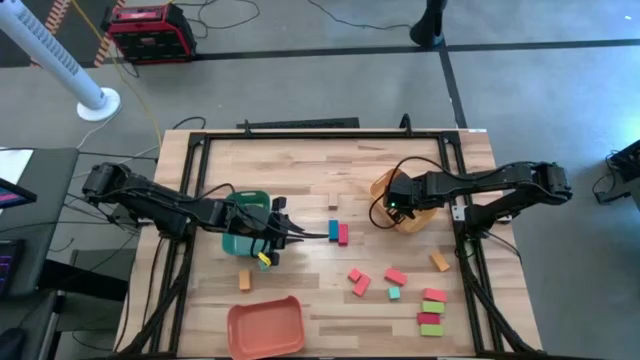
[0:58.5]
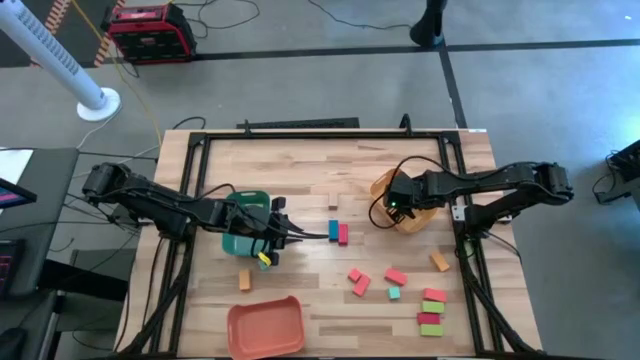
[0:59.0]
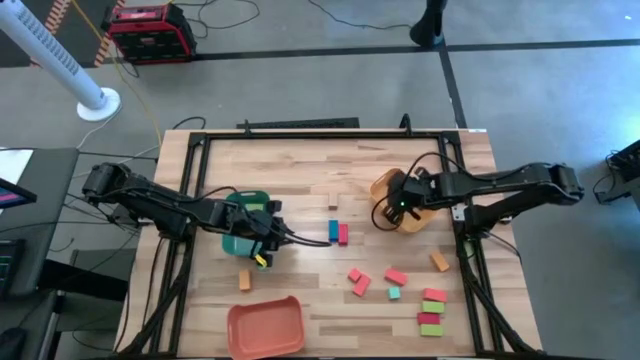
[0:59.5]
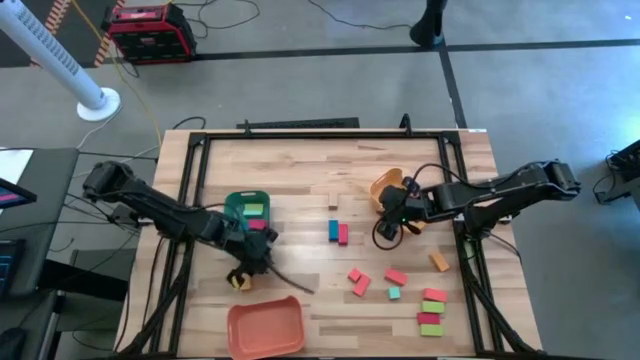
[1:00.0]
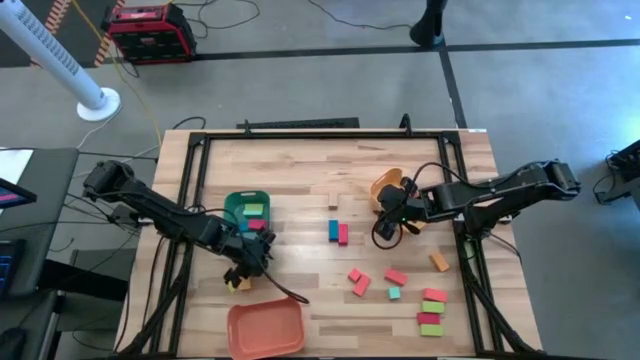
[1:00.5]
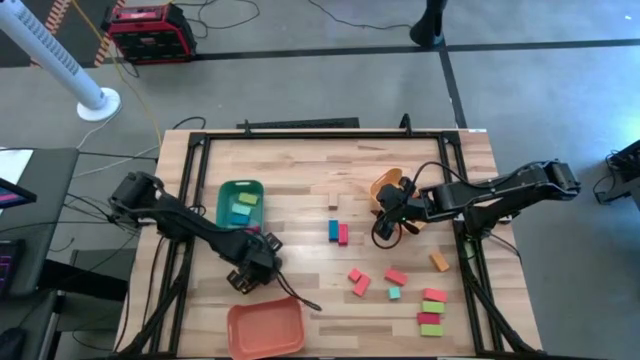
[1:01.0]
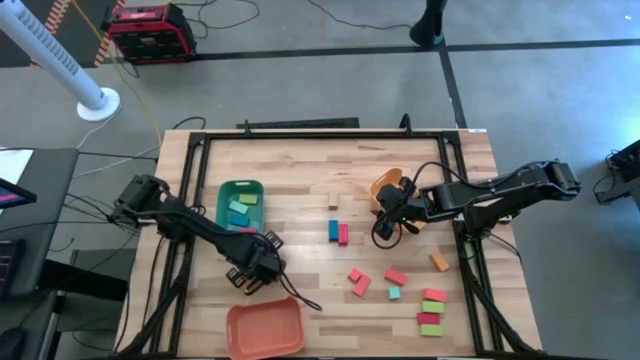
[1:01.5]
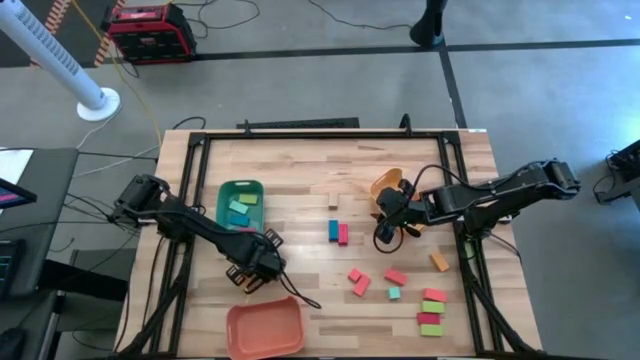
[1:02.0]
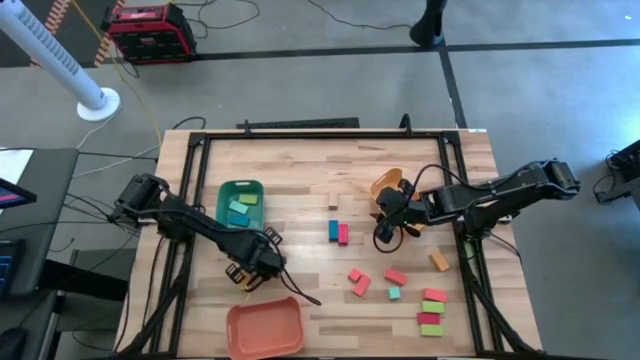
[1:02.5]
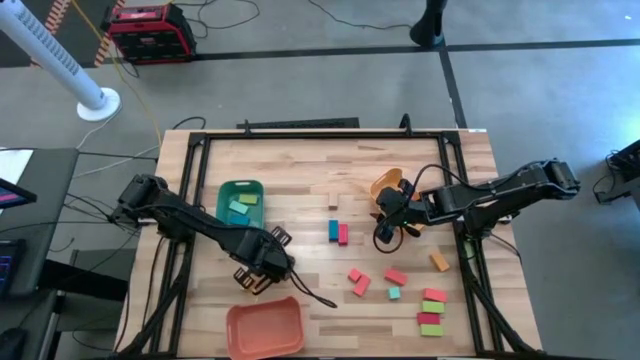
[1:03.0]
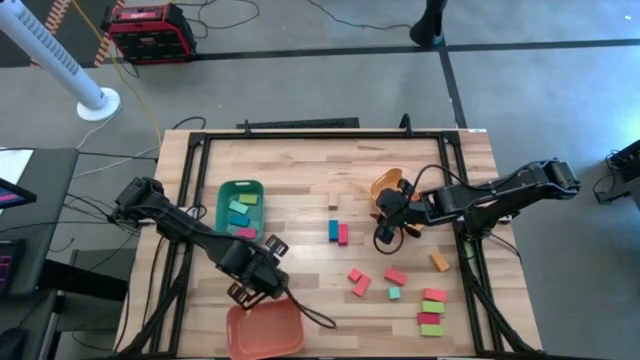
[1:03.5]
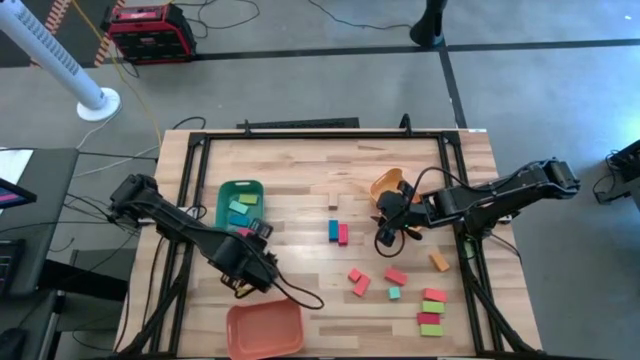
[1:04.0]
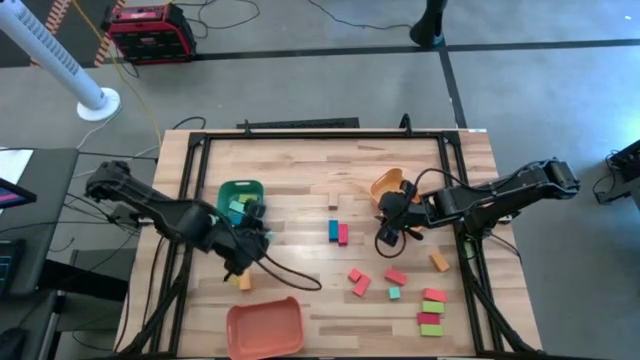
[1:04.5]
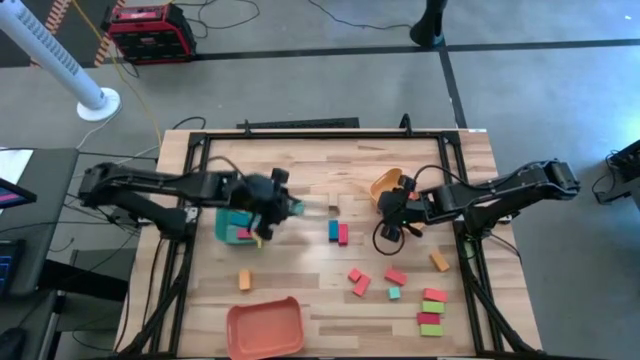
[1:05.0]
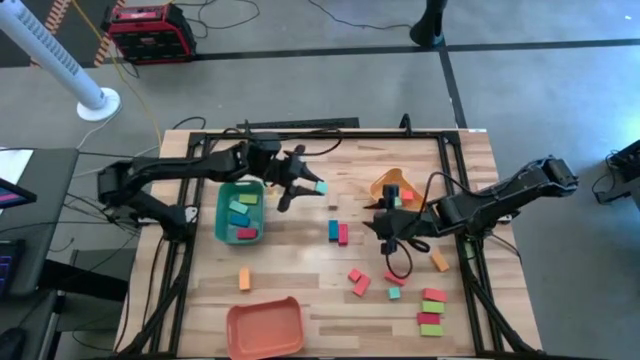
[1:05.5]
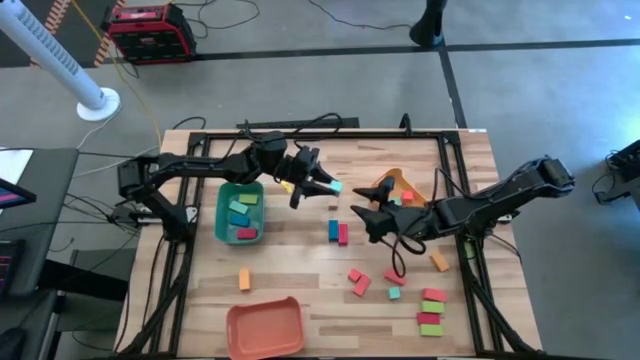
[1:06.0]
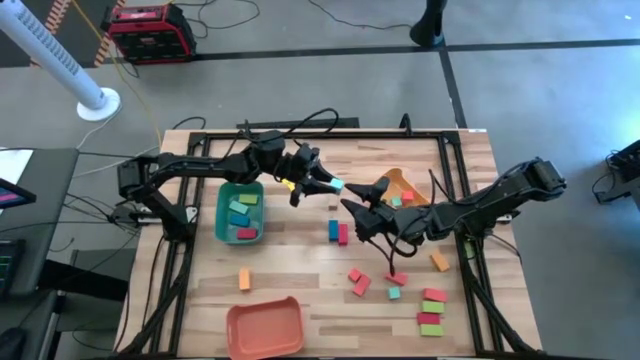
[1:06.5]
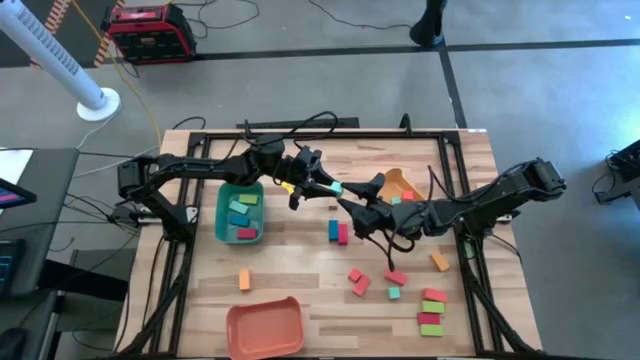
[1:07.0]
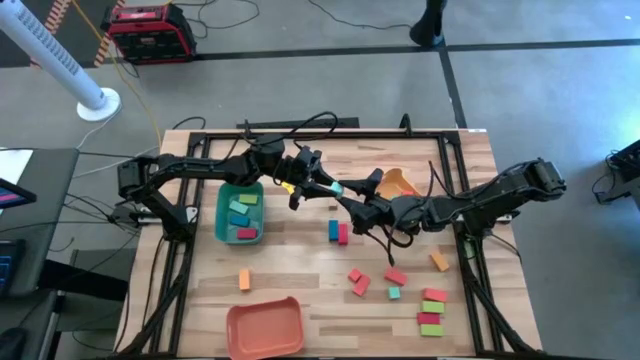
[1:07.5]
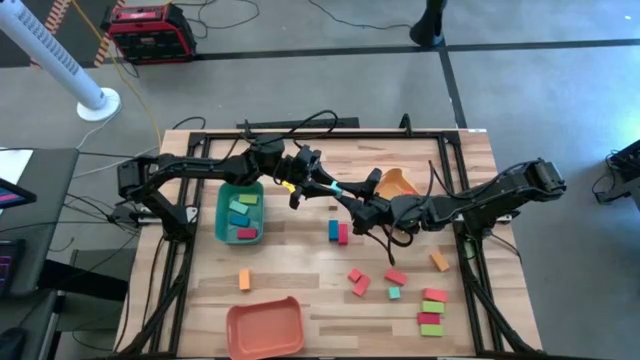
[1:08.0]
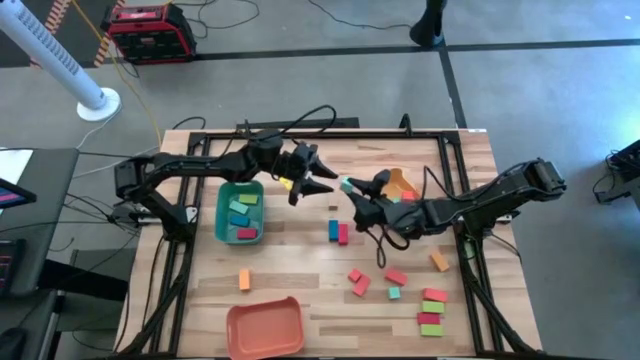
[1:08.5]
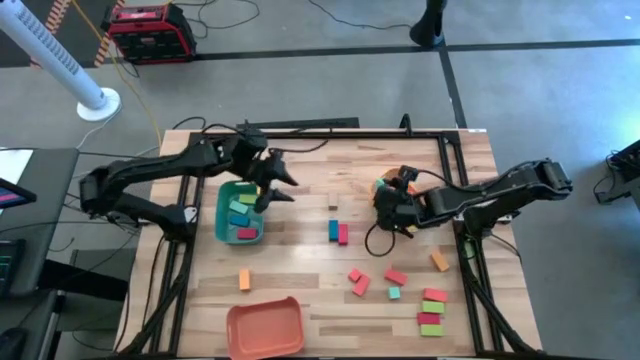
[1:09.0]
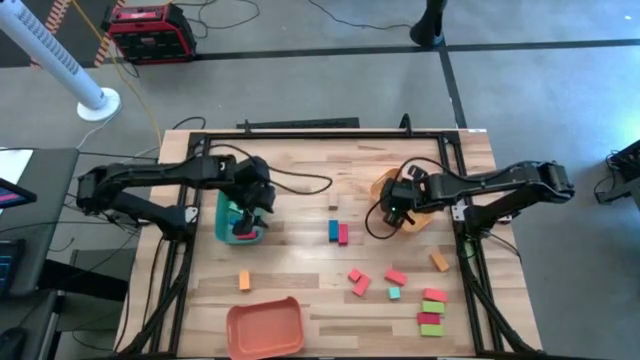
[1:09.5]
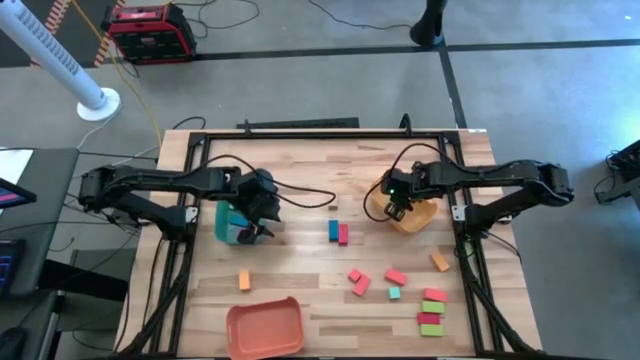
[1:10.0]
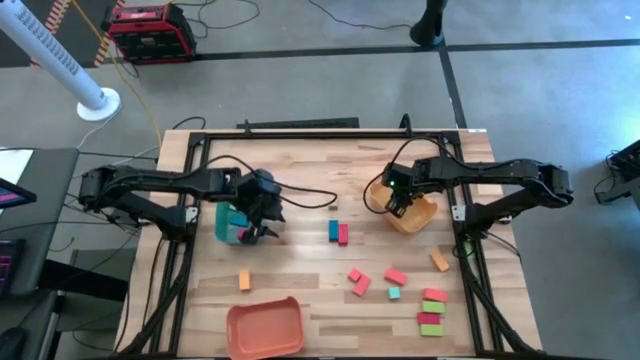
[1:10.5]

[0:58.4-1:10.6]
Task: Sort blocks by size
Put the top light blue cube block into the yellow bin

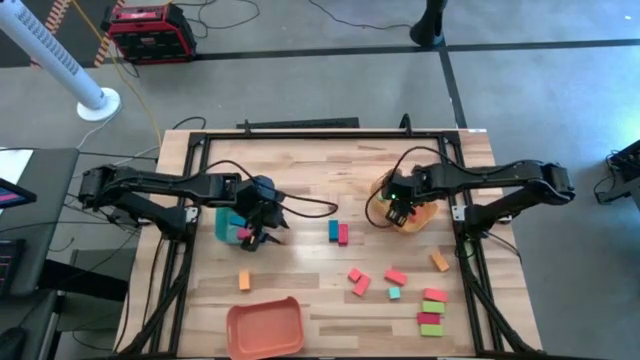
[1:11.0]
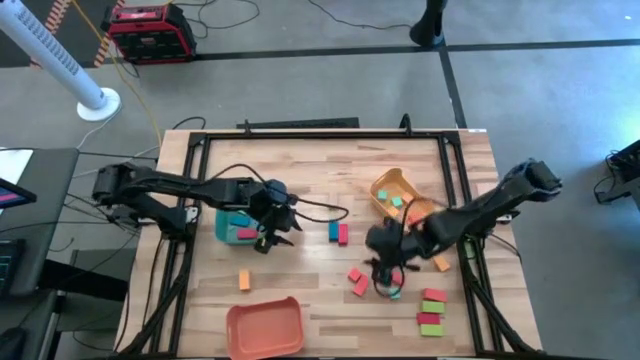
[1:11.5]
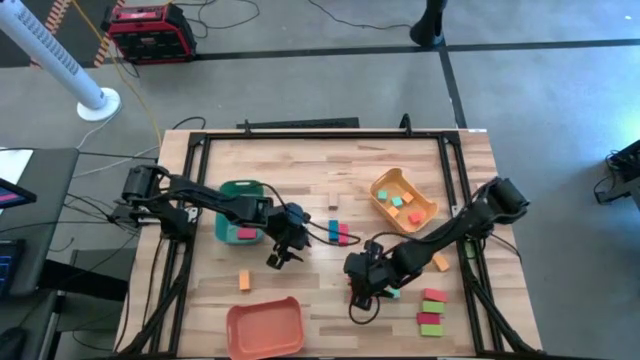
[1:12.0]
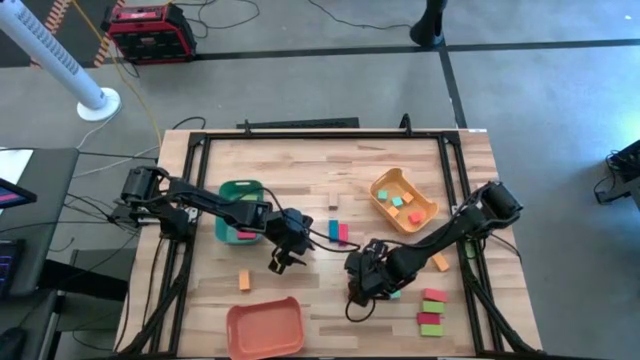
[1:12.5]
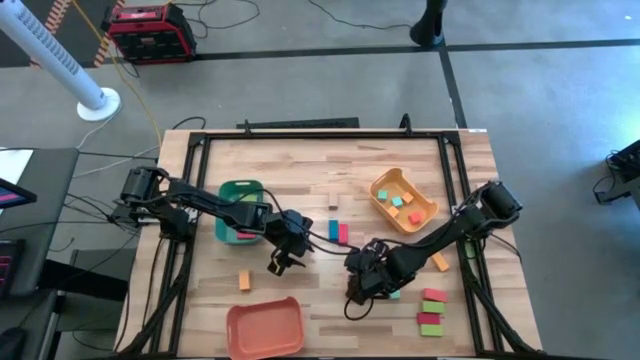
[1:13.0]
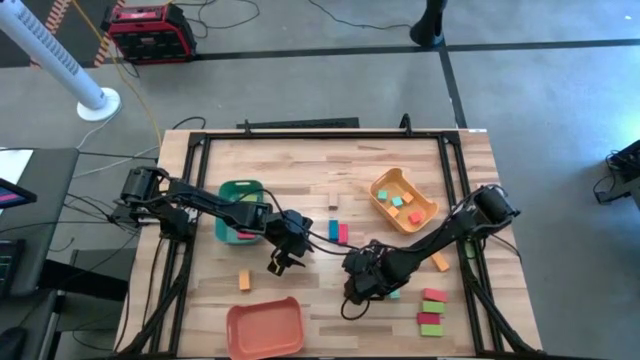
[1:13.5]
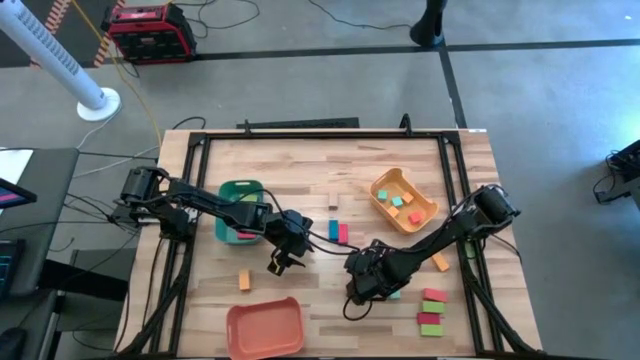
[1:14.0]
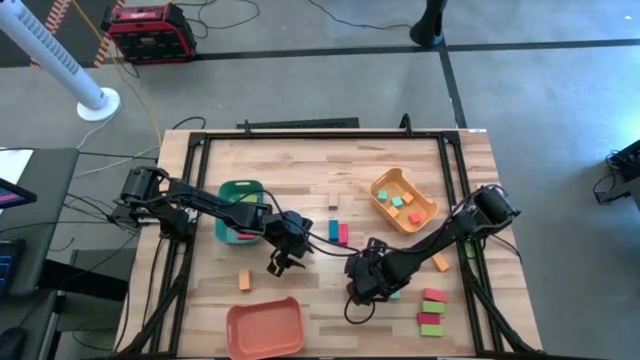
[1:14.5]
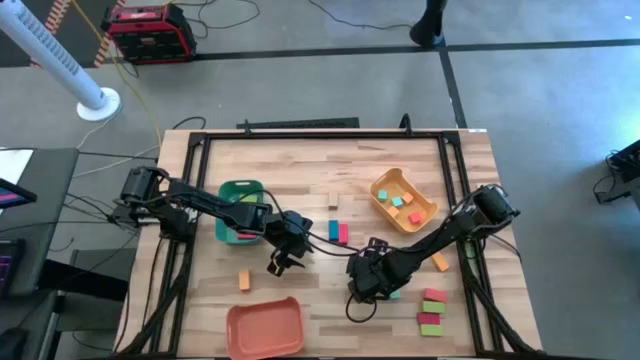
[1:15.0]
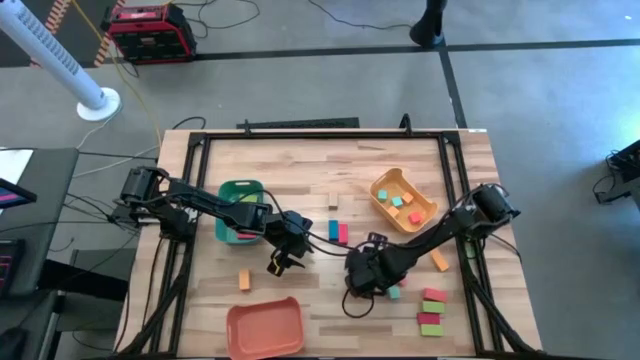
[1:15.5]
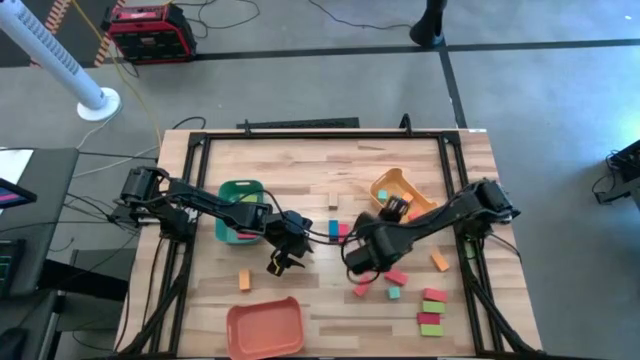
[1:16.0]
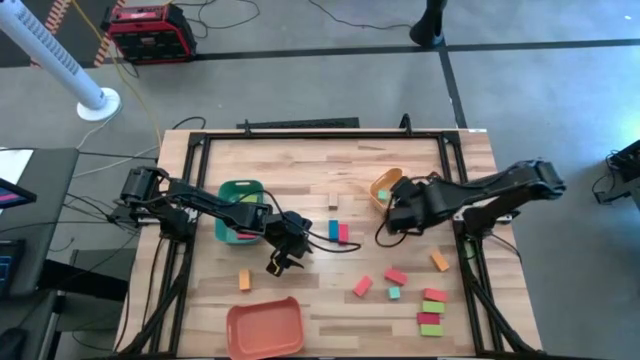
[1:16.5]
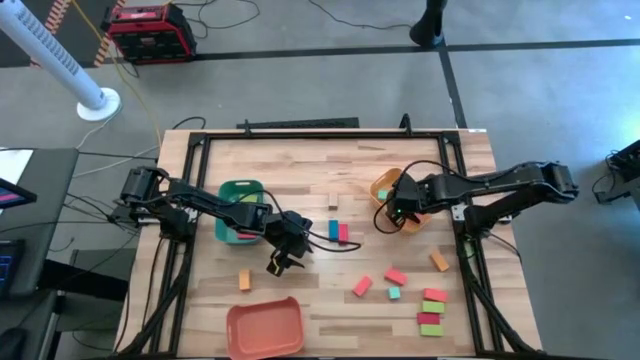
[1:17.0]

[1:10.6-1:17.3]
Put the orange cube block into the yellow bin

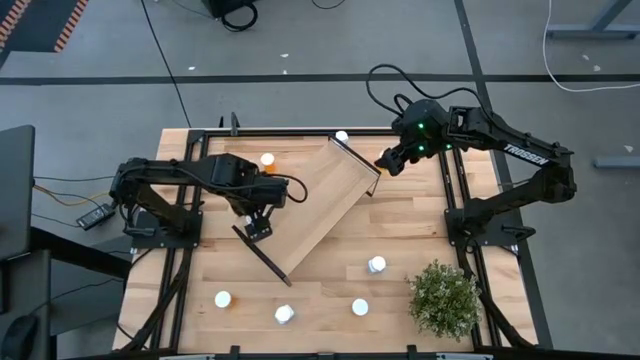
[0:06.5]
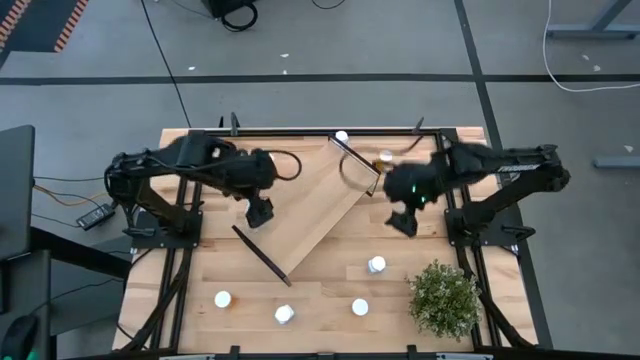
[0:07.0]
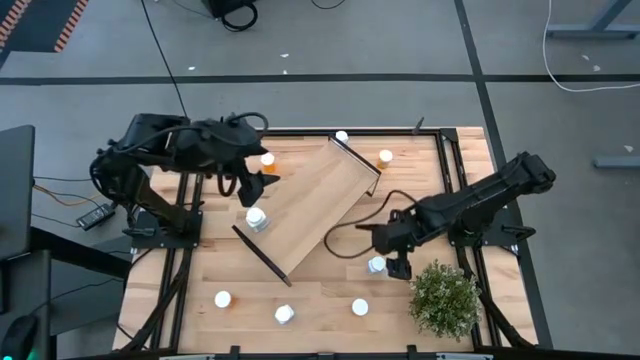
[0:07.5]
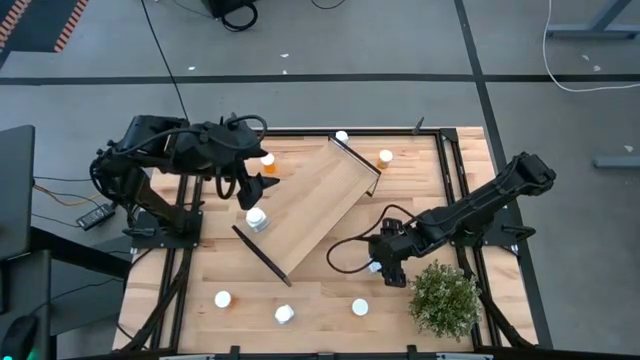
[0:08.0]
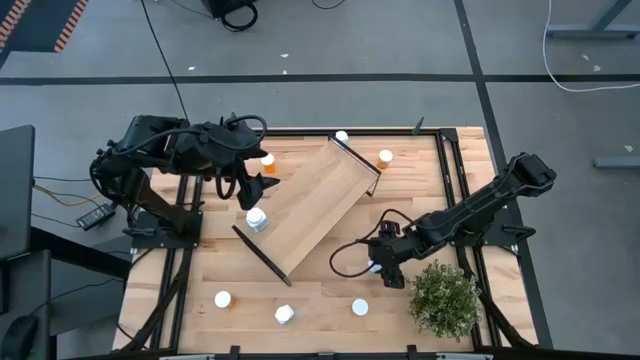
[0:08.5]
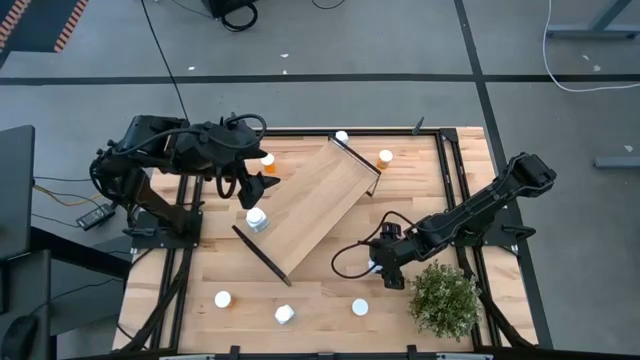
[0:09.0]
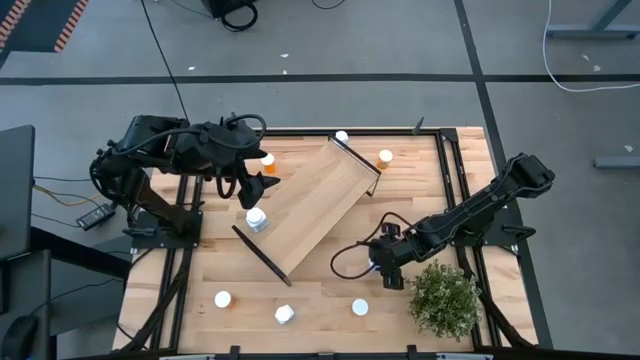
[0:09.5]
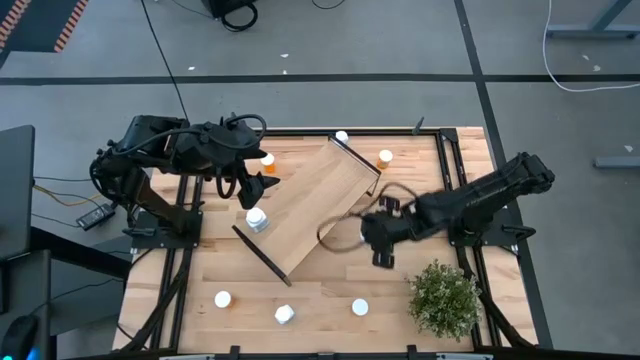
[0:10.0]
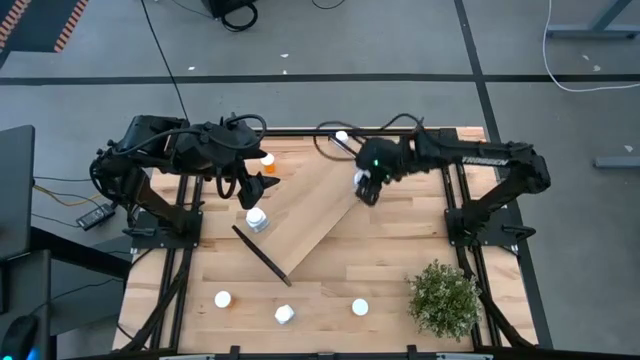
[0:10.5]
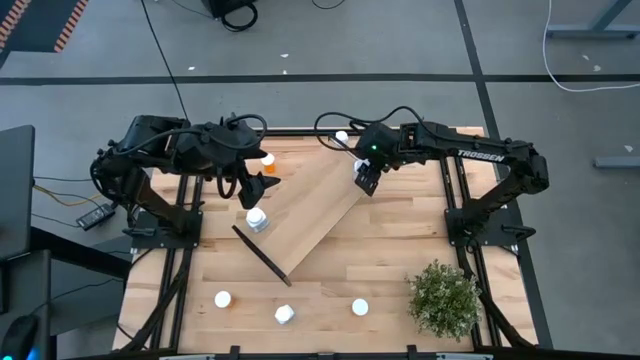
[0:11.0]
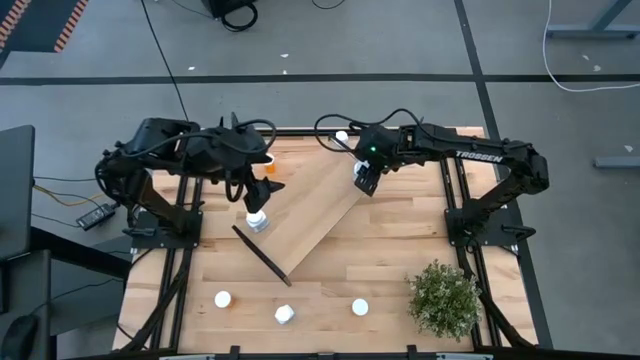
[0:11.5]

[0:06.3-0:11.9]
Task: Pick and place medicine bottles onto shelf by color
Put the white pill bottle on the shelf
